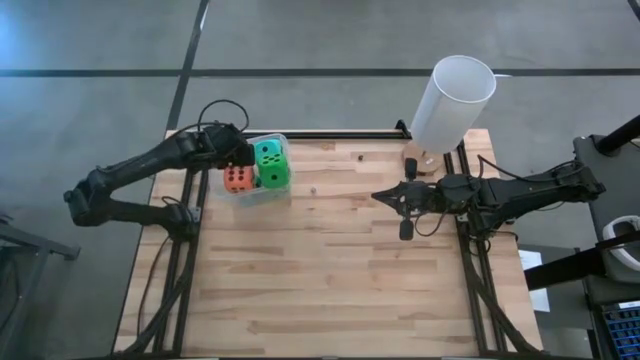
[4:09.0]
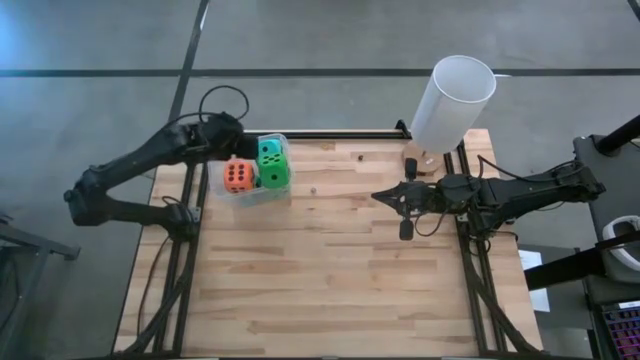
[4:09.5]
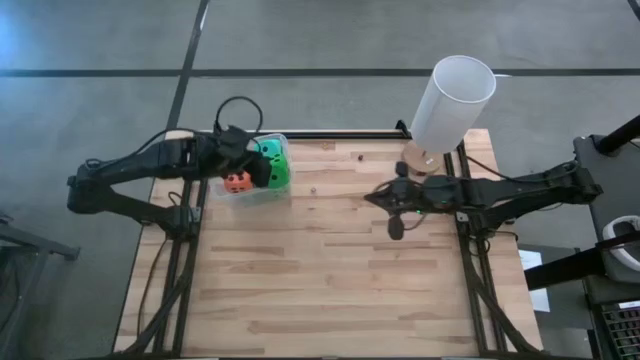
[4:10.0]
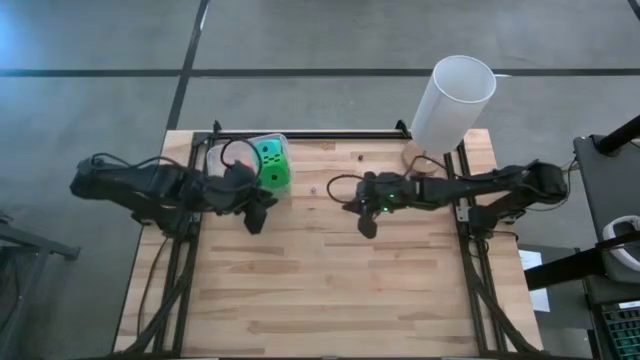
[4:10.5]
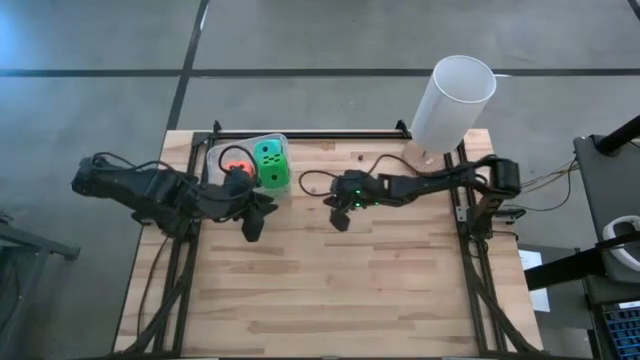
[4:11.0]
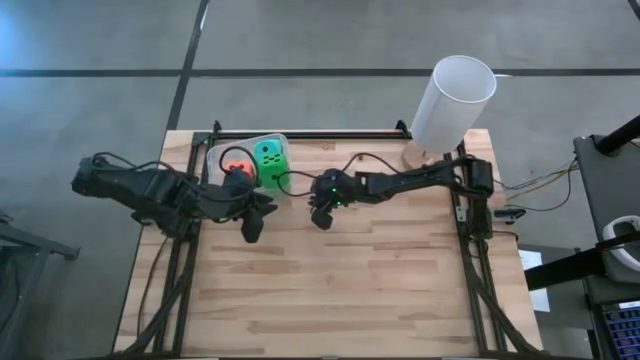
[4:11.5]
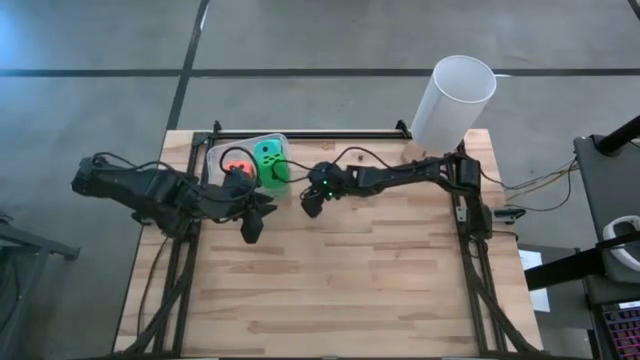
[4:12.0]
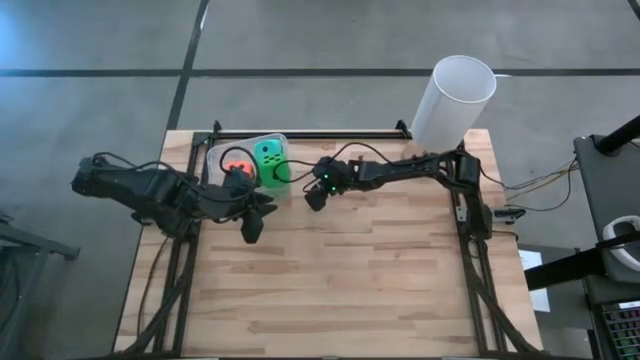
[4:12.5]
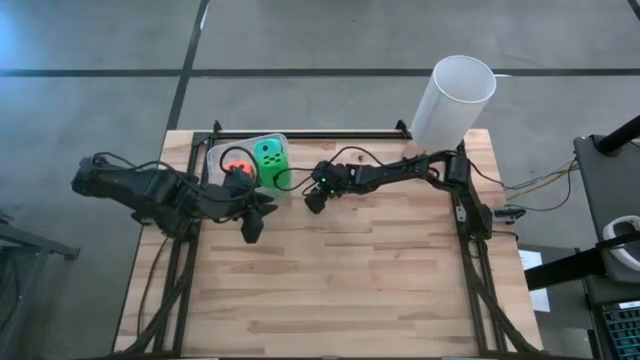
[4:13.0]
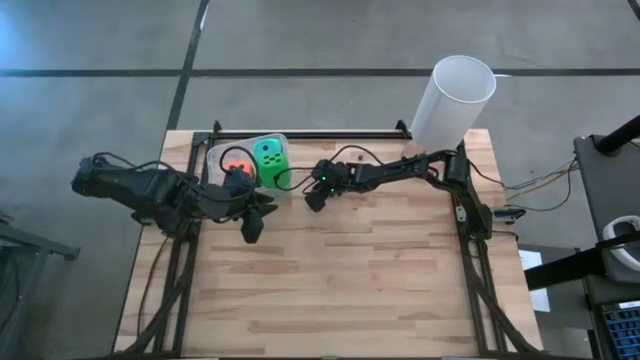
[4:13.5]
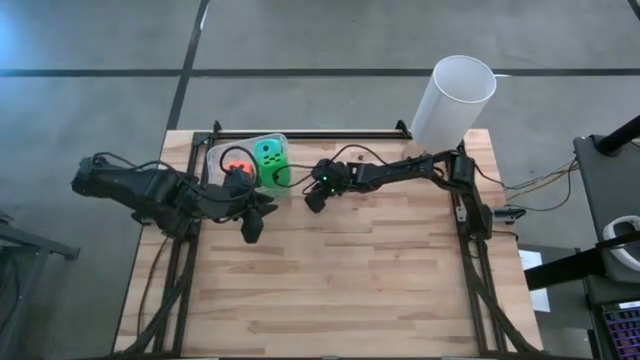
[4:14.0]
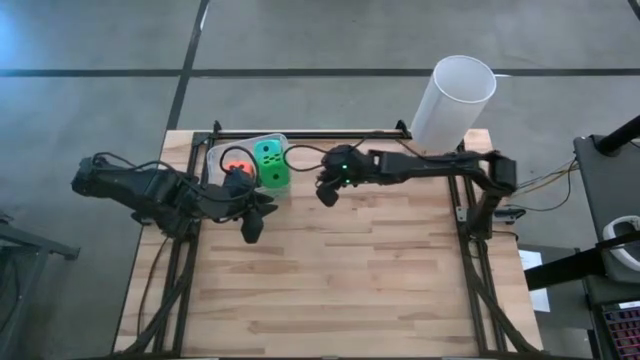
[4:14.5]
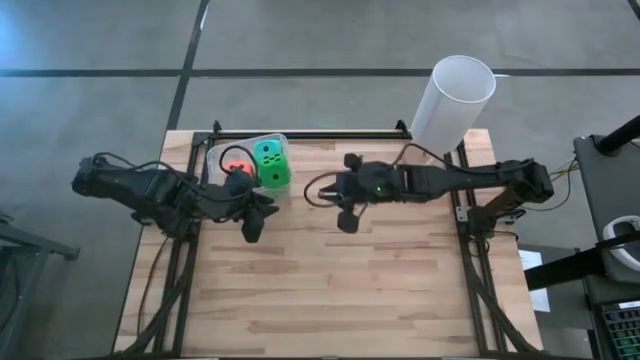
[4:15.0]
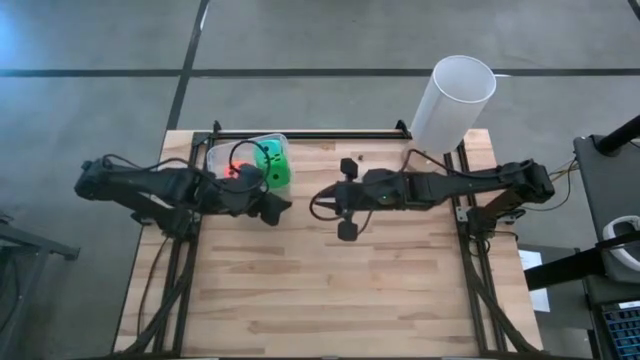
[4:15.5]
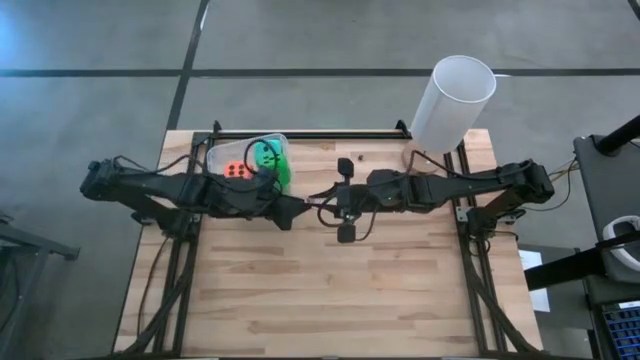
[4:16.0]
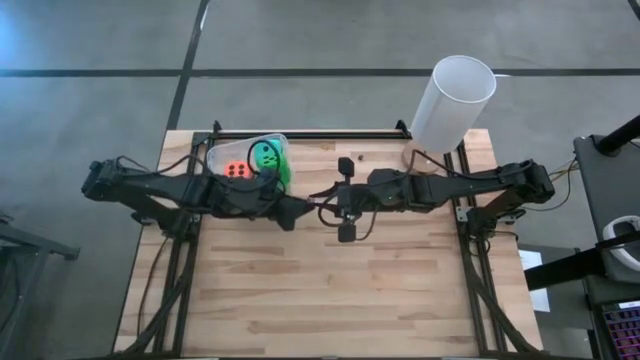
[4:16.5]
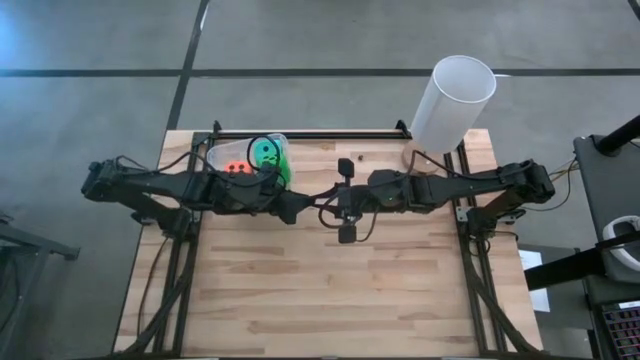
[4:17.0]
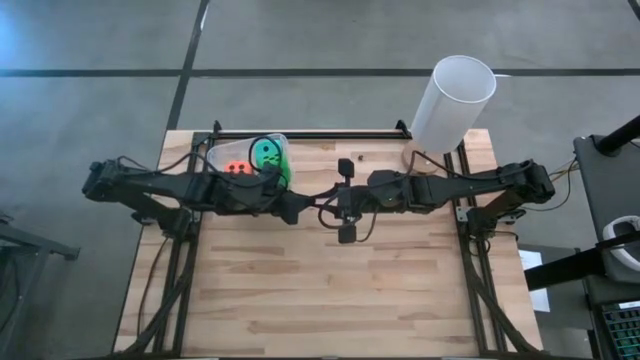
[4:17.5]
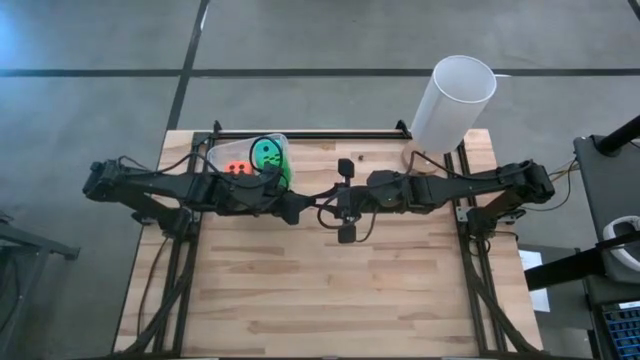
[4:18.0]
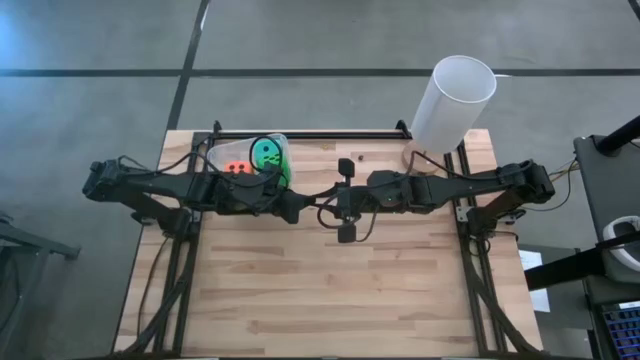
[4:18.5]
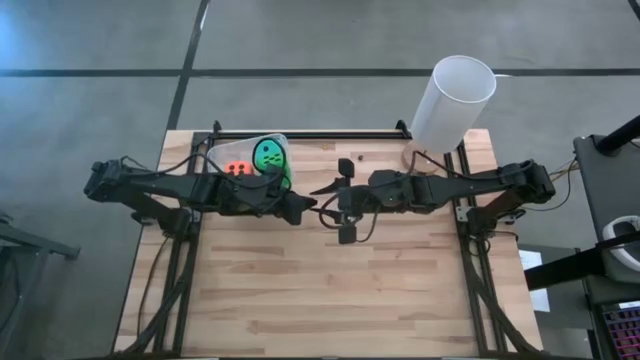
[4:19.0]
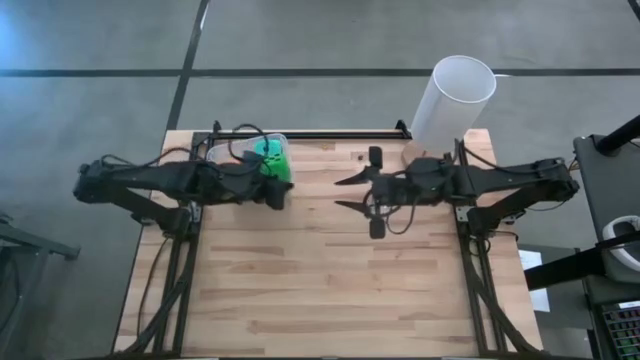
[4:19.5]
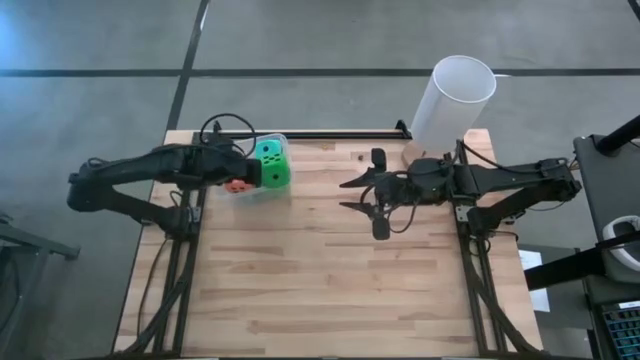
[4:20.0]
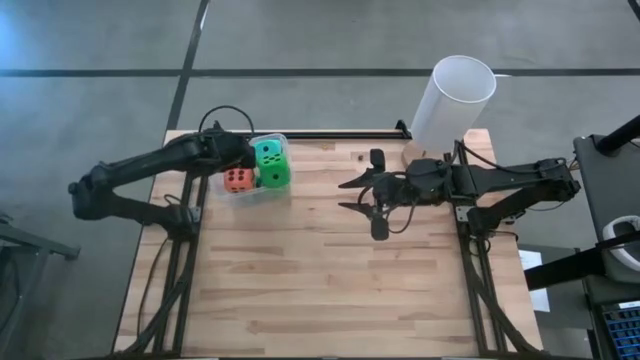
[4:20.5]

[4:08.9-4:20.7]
Task: Pick & Place Dice
Put the small purple dice into the transparent bin

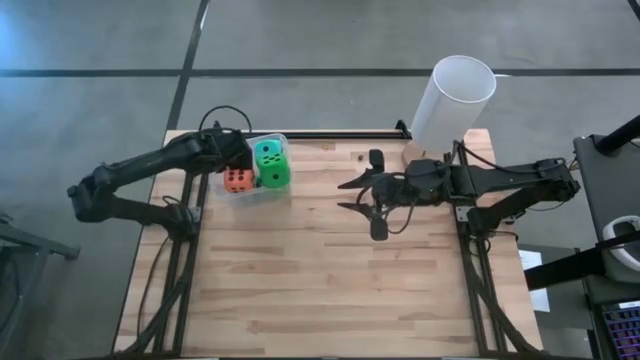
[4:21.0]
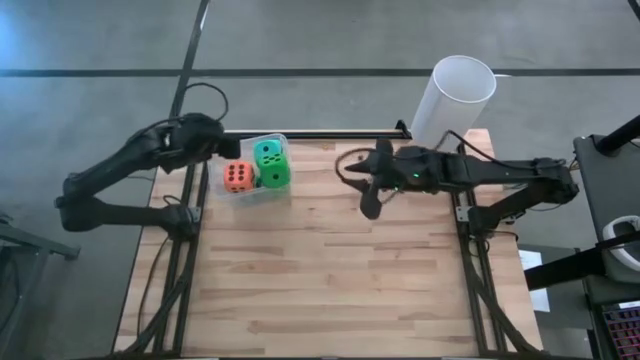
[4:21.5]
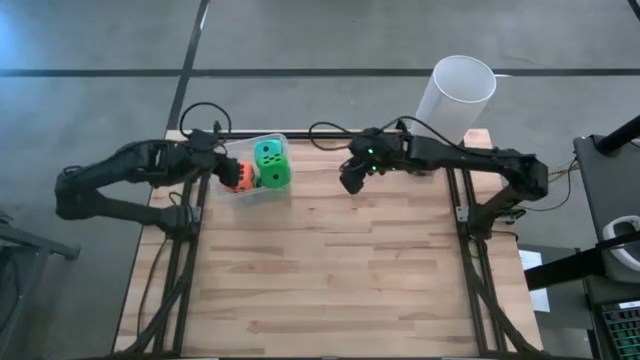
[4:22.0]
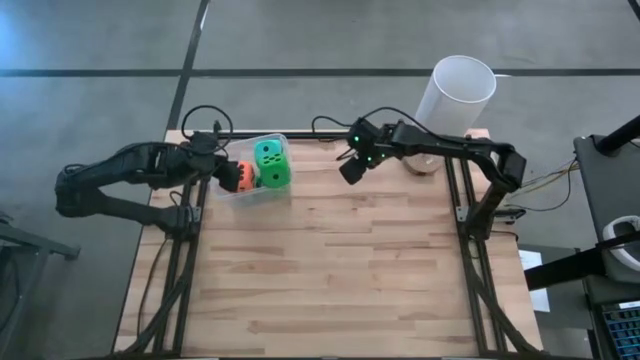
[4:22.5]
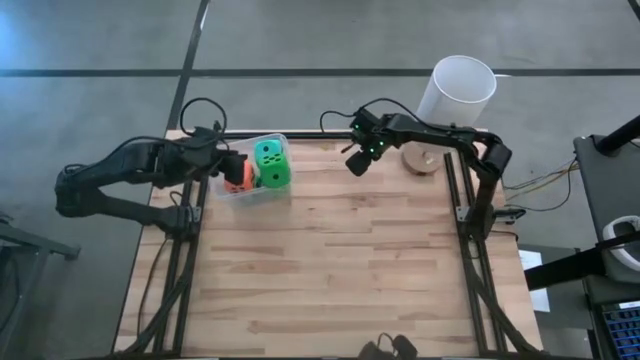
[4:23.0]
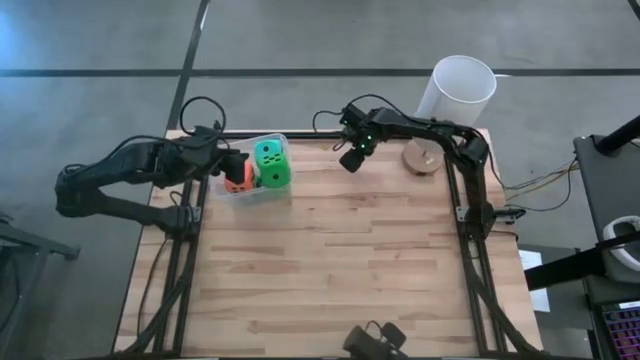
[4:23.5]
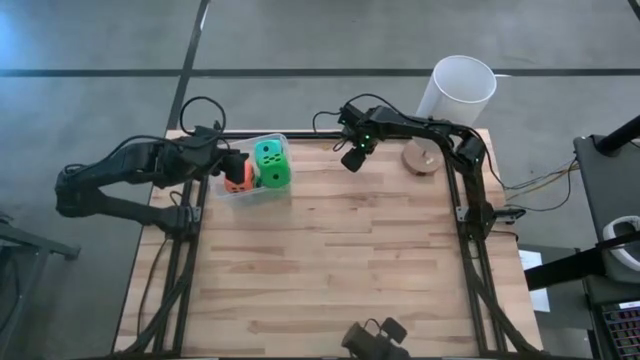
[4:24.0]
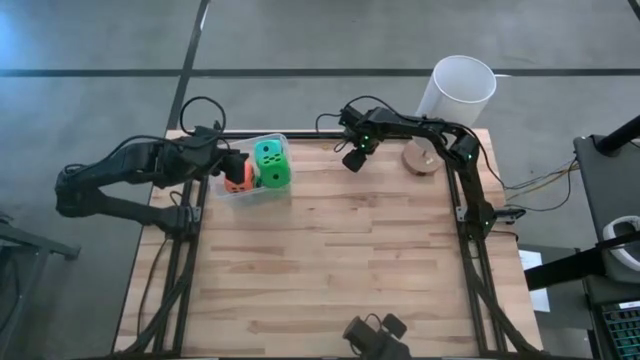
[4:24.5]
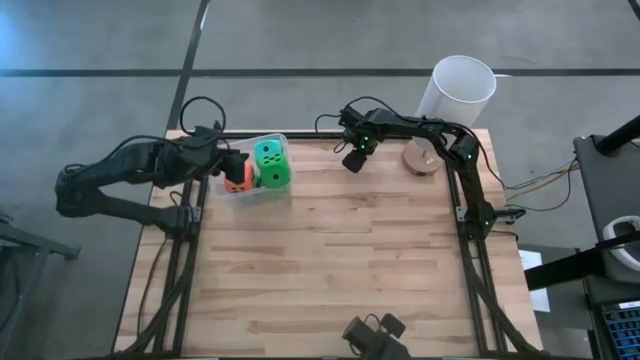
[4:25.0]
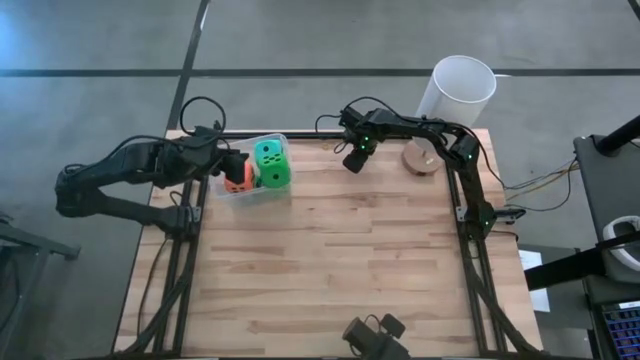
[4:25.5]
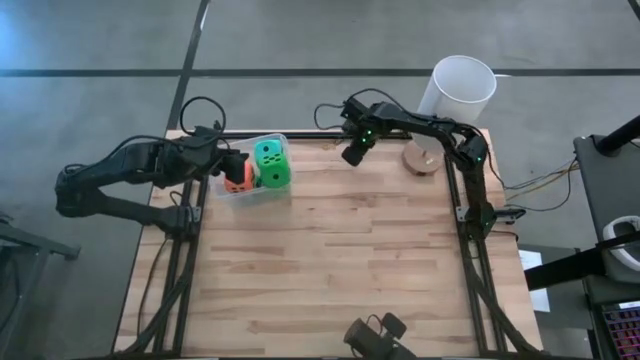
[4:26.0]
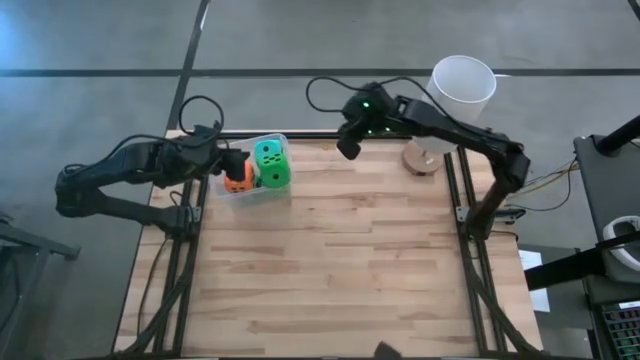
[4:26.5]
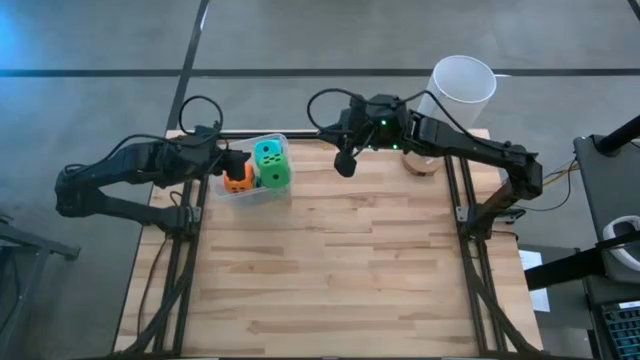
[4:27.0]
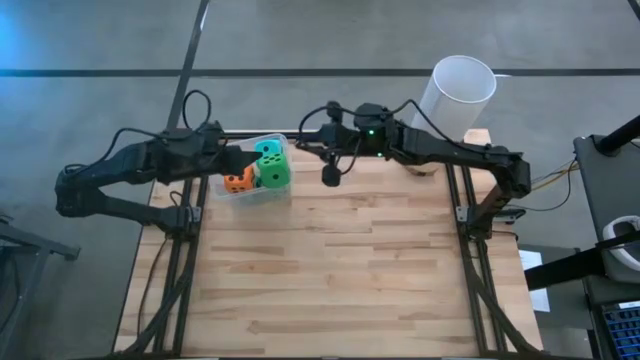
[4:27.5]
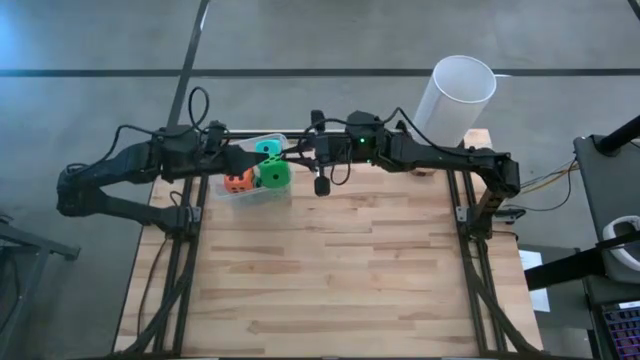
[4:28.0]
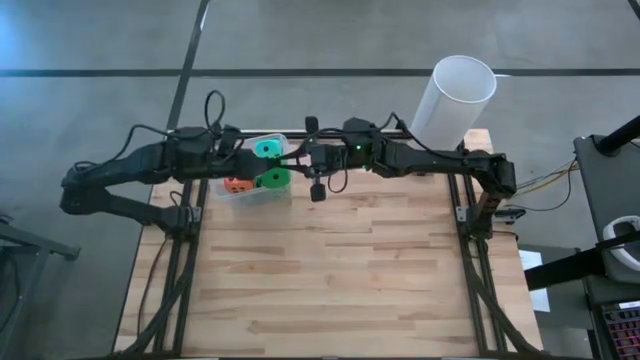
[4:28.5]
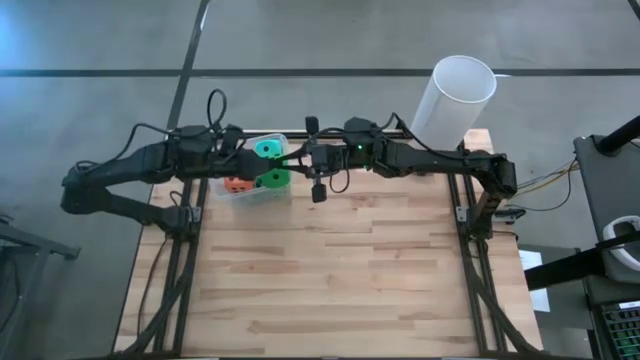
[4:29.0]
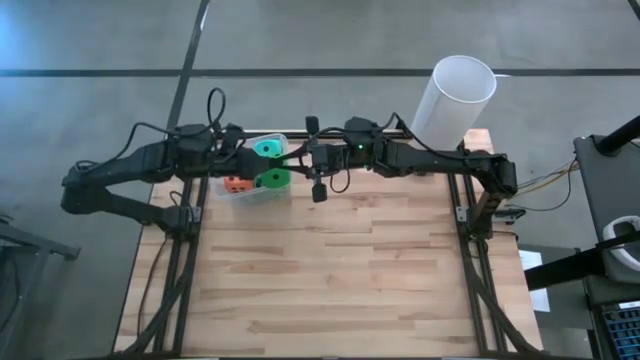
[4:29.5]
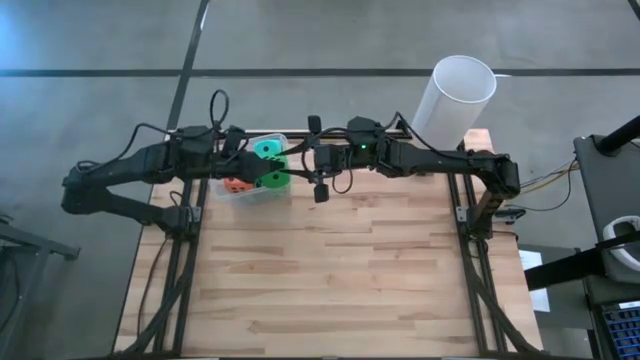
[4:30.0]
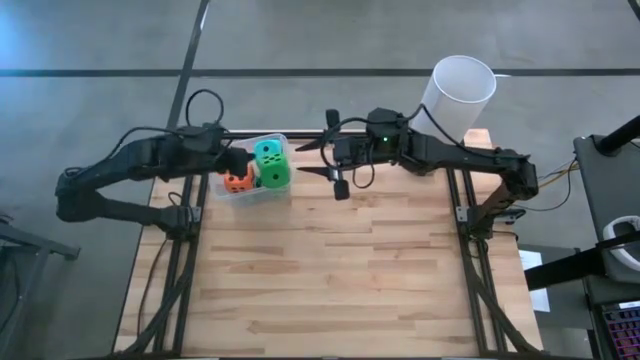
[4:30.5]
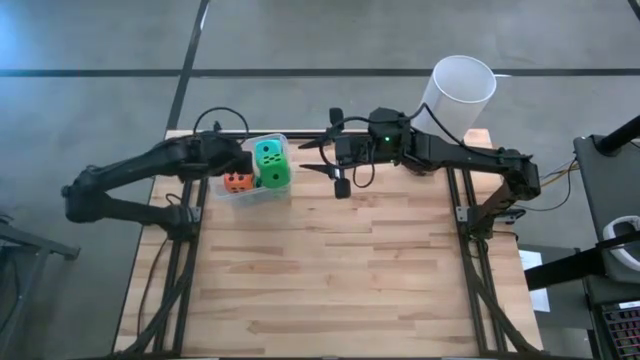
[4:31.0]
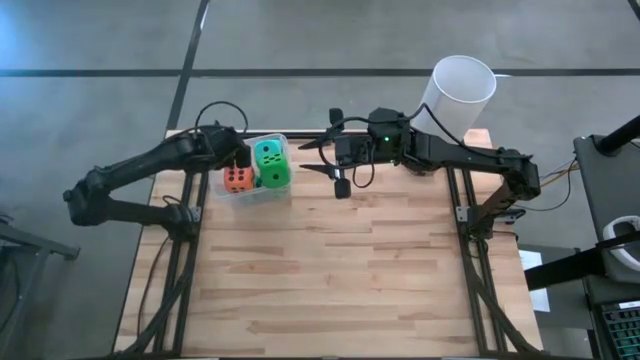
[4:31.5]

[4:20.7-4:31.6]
Put the small black dice into the transparent bin
